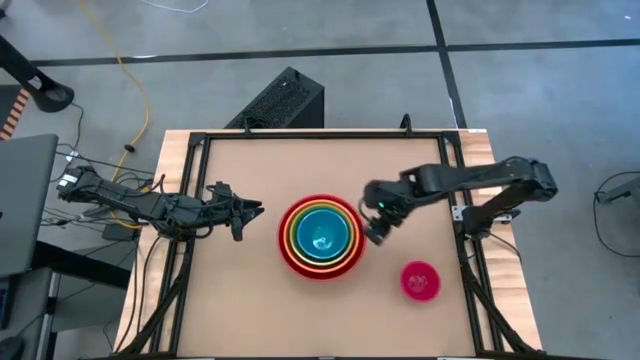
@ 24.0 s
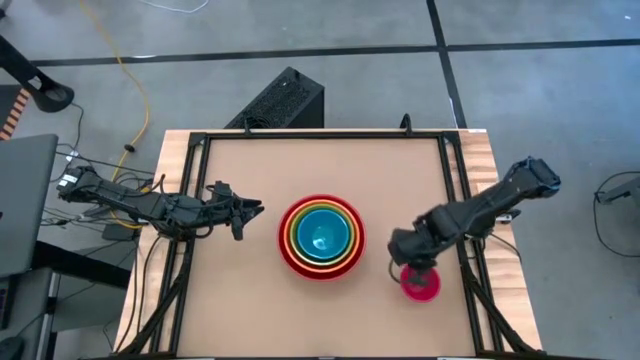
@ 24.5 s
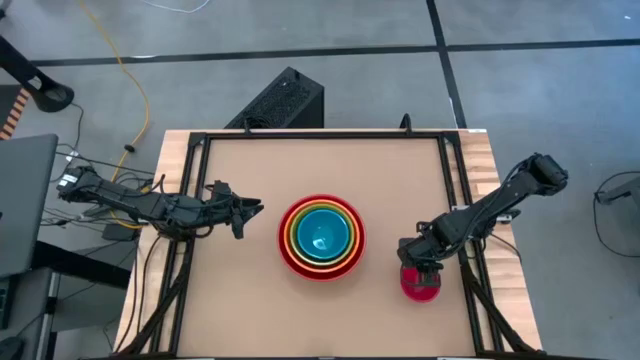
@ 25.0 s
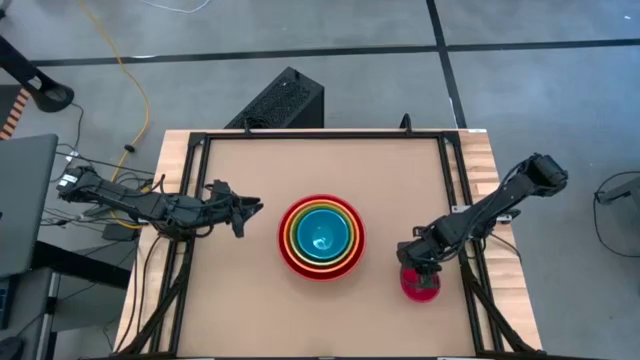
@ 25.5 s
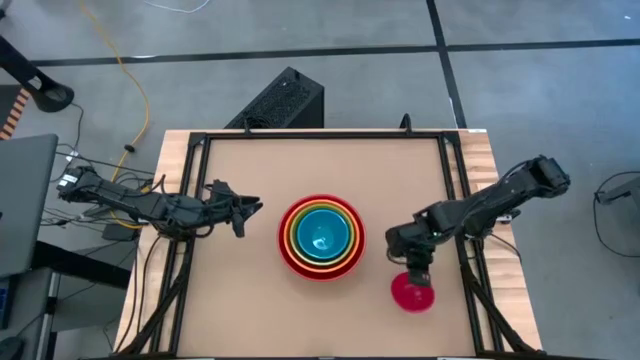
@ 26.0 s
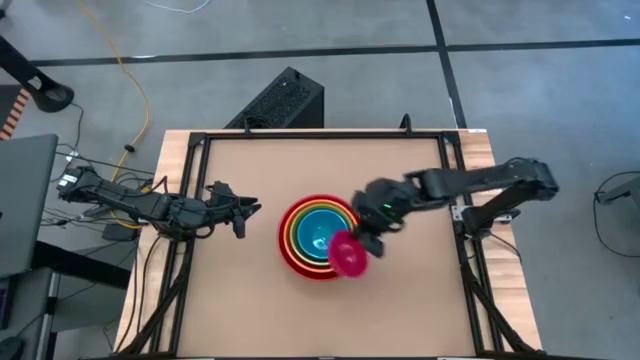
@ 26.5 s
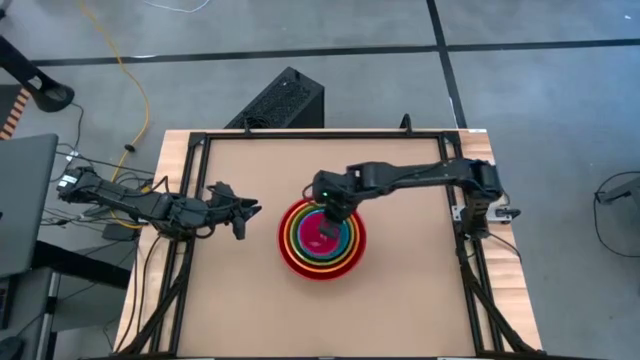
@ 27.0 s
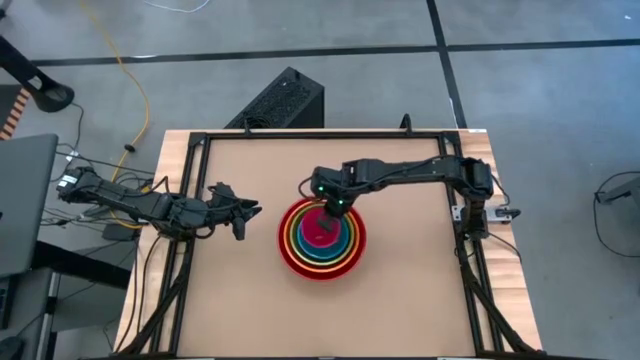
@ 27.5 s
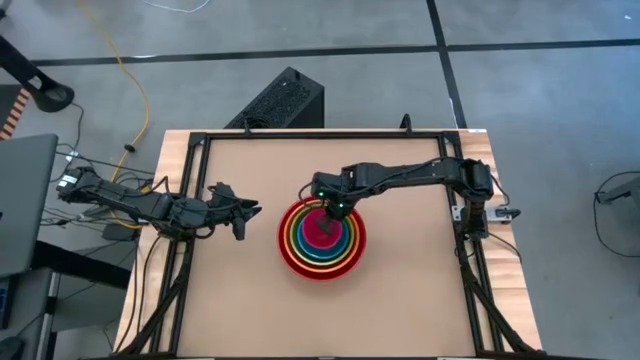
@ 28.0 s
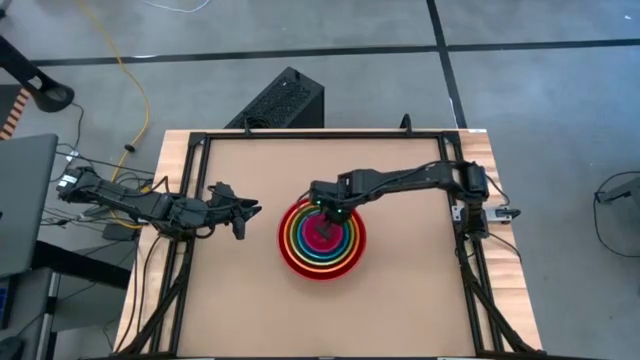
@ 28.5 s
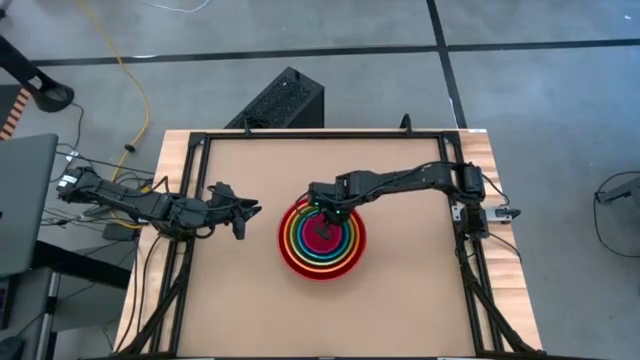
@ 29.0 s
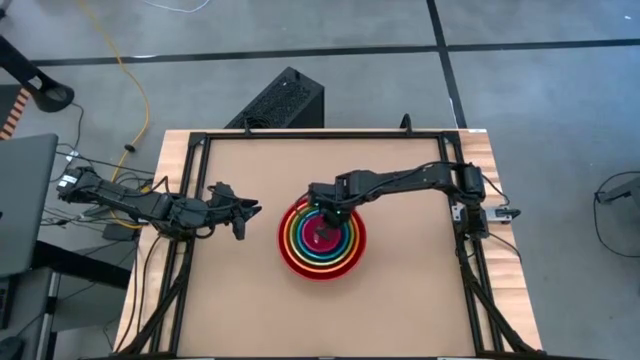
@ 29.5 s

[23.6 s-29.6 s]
Stack the pink bowl on top of the blue bowl

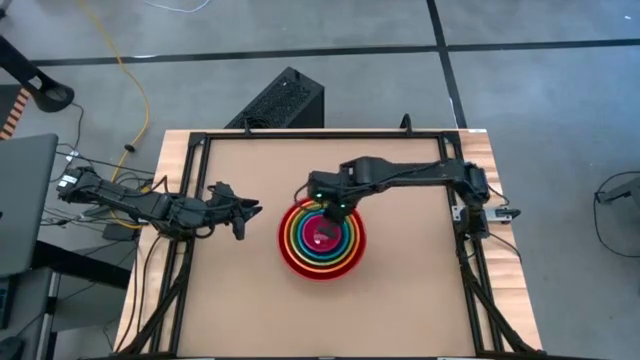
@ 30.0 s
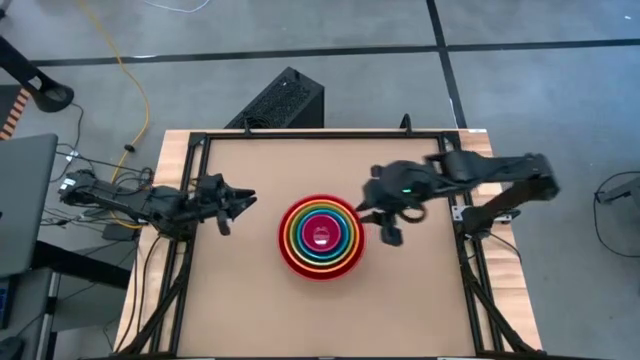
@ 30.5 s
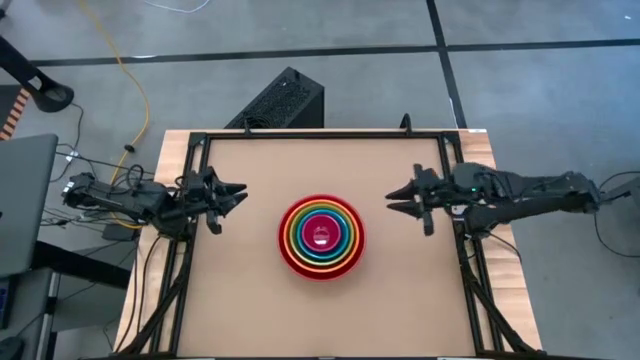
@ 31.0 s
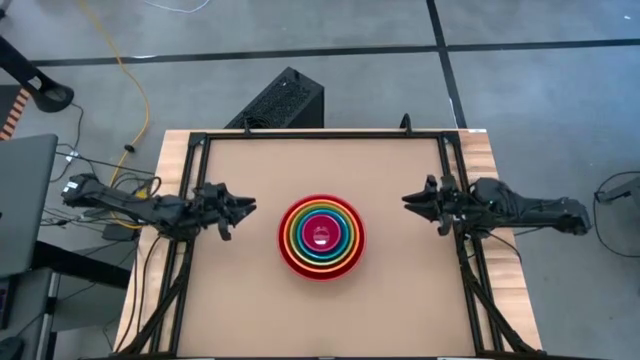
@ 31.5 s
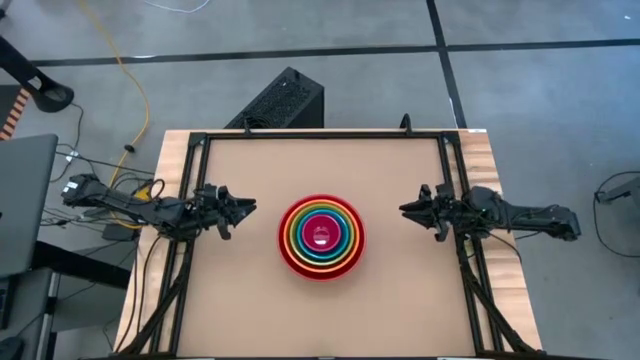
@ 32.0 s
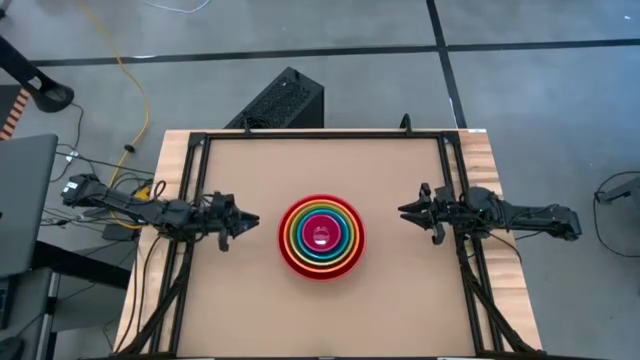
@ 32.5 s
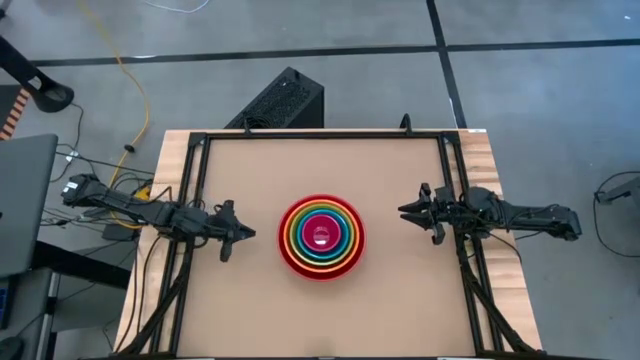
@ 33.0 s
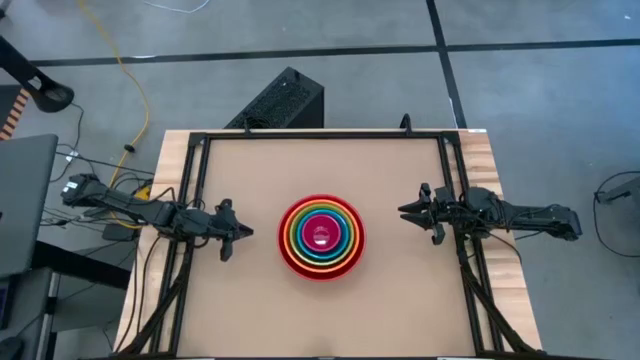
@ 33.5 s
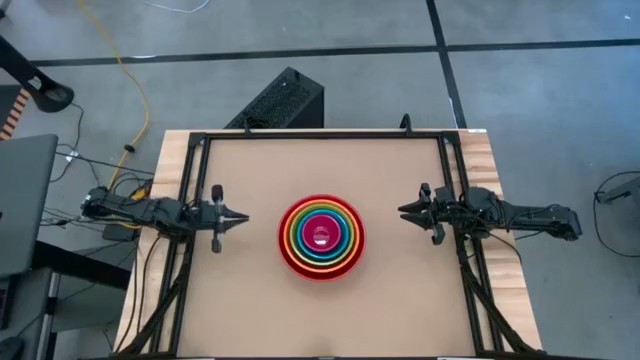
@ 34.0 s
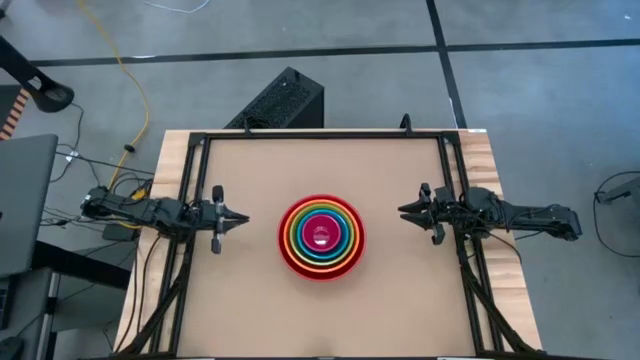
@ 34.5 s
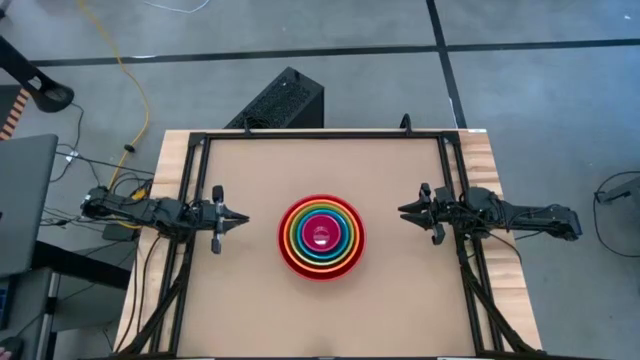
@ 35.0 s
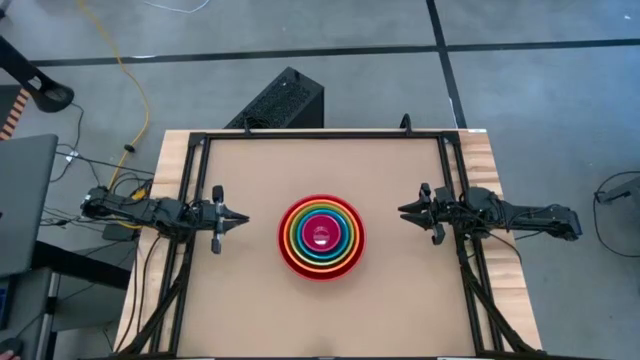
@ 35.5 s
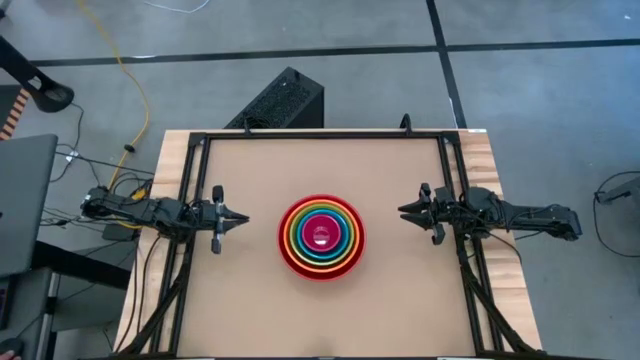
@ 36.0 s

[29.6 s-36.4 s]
Return to Home Position

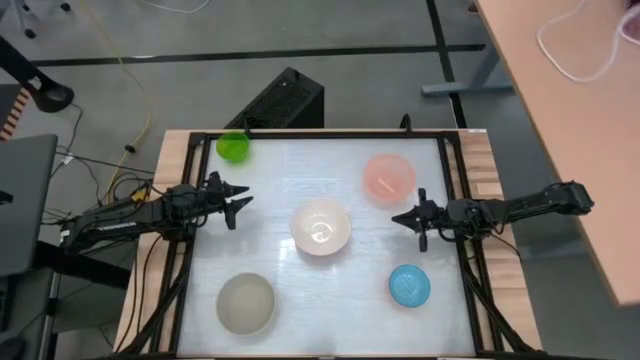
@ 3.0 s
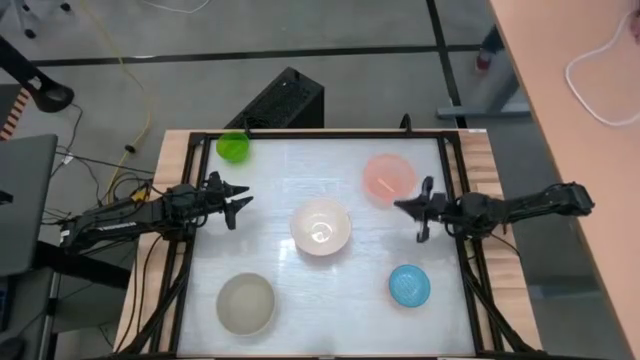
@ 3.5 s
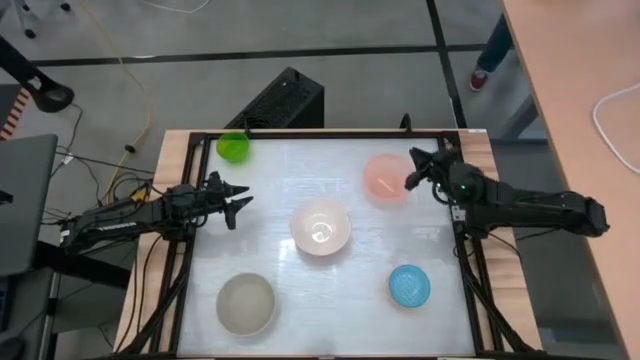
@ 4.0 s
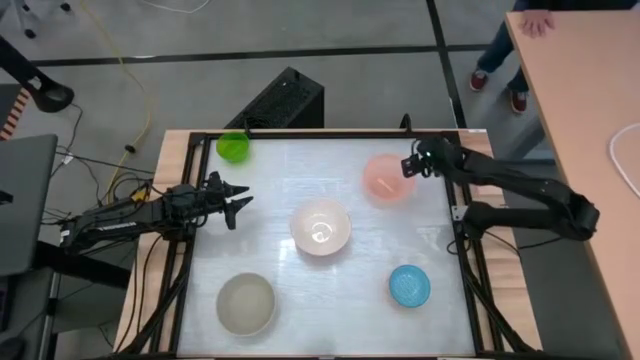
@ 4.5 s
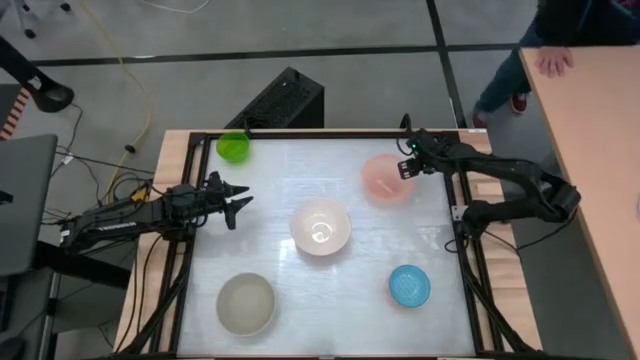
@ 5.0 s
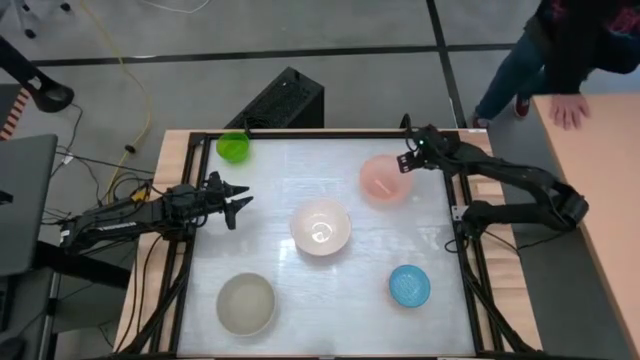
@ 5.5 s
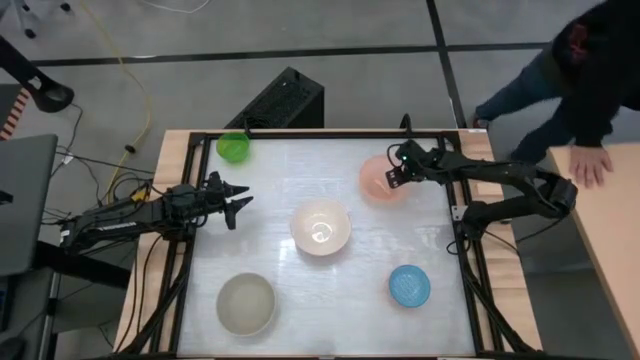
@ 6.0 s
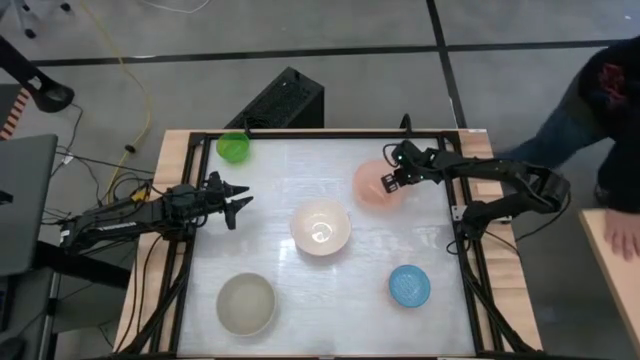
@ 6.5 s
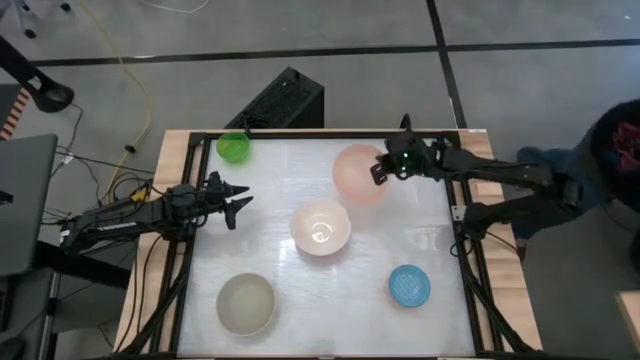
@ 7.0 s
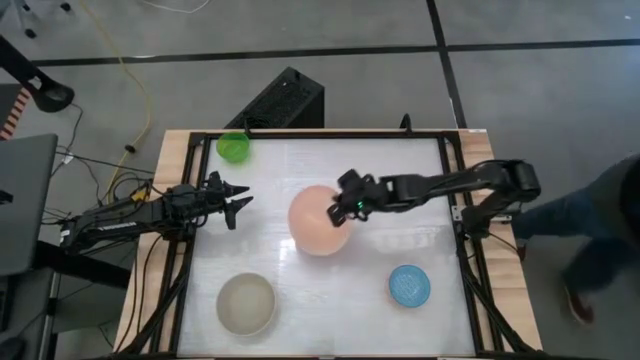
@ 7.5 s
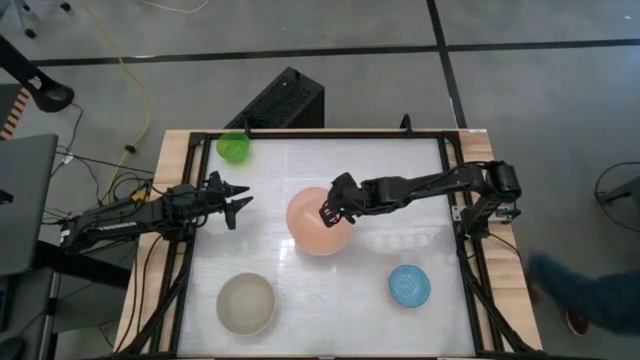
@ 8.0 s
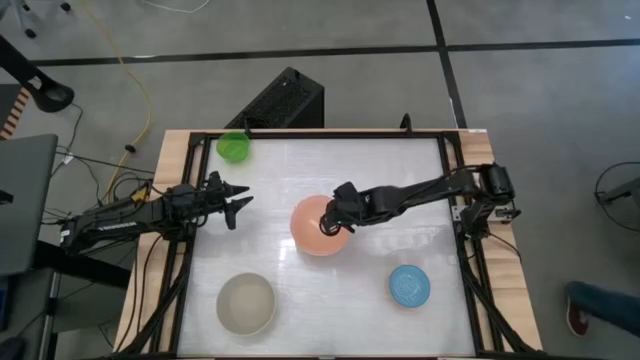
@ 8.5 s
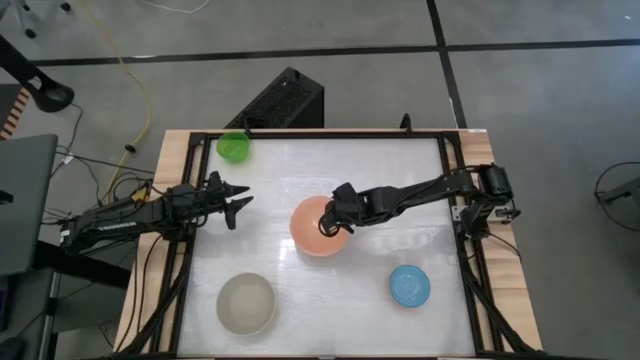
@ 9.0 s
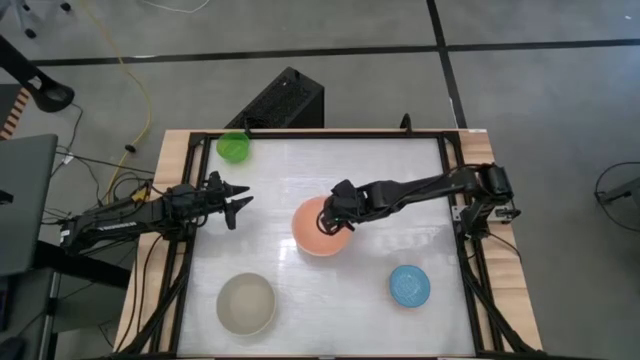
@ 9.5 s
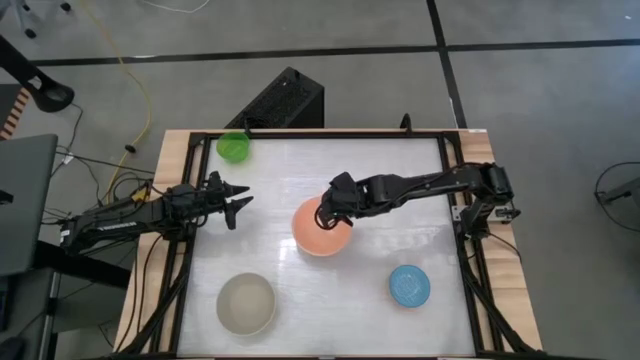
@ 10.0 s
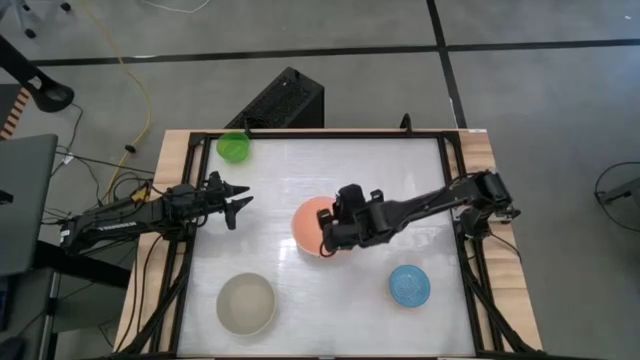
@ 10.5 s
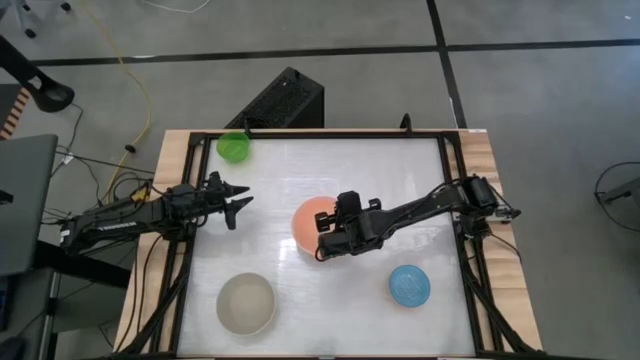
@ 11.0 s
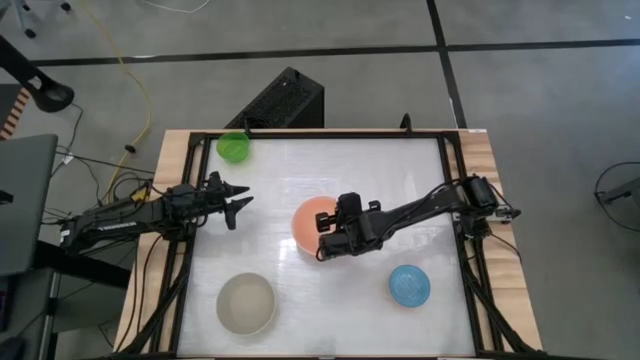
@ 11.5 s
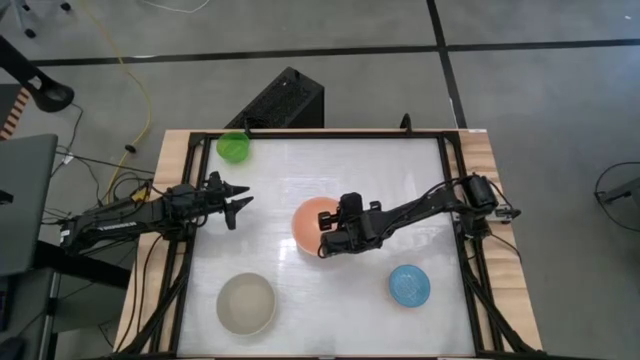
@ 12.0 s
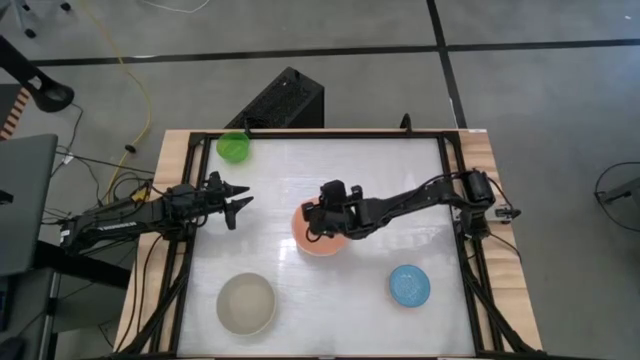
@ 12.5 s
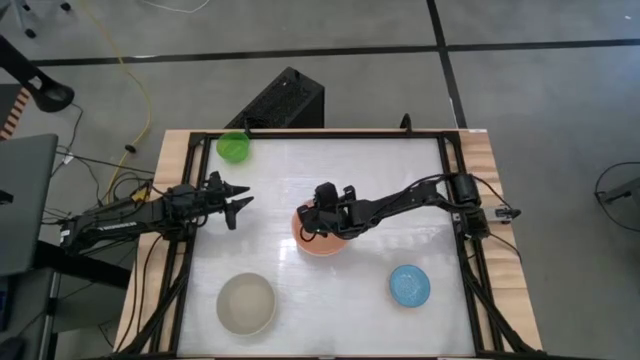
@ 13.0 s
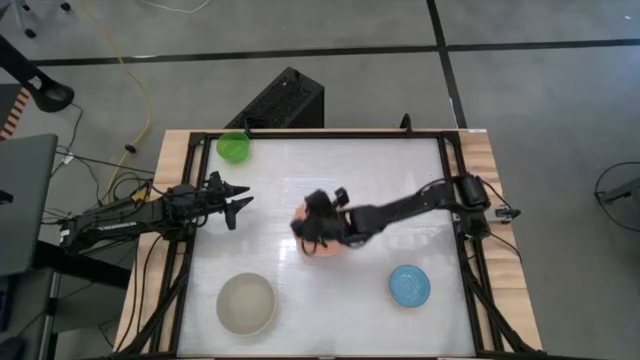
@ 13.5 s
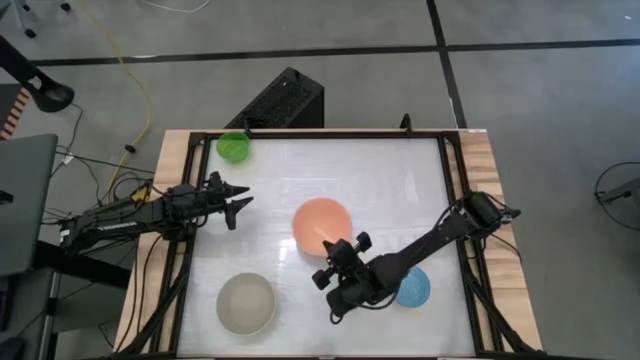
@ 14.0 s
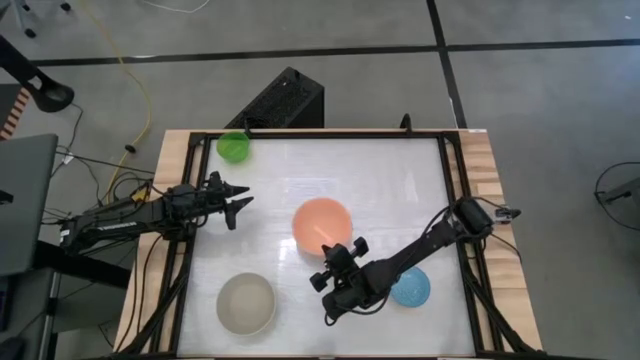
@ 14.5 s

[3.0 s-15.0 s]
Stack the pink bowl on top of the white bowl
